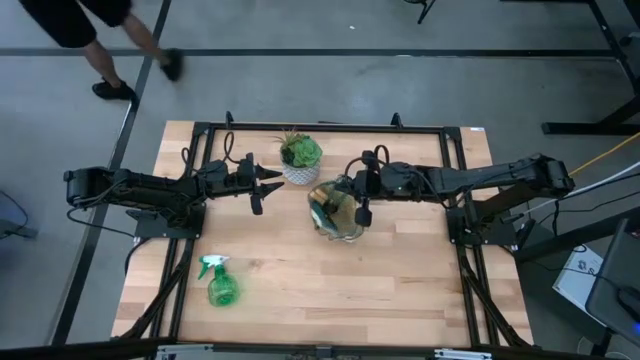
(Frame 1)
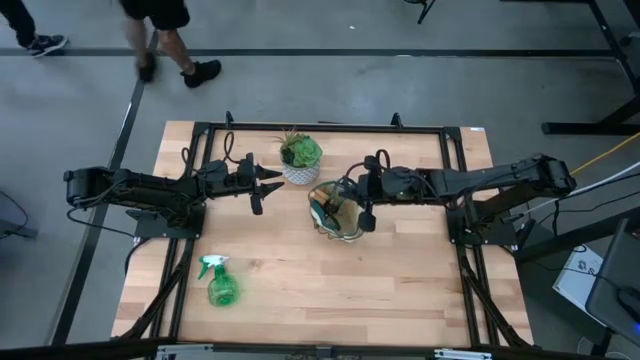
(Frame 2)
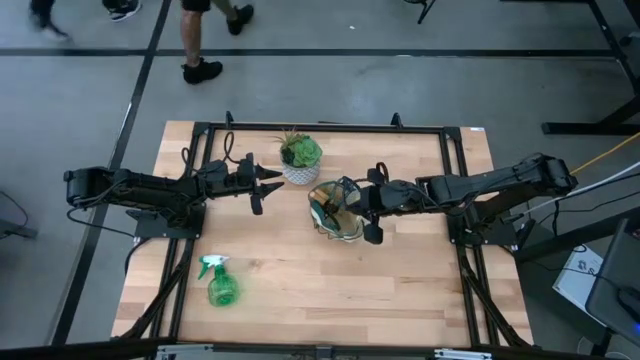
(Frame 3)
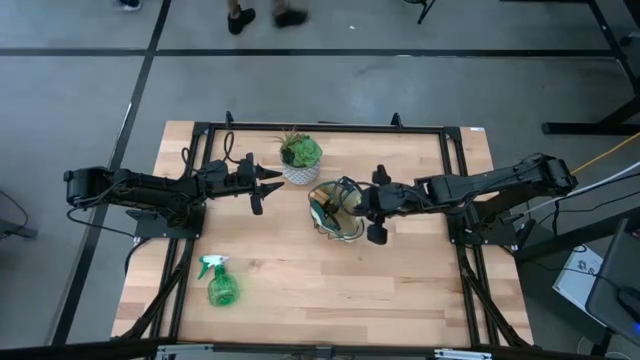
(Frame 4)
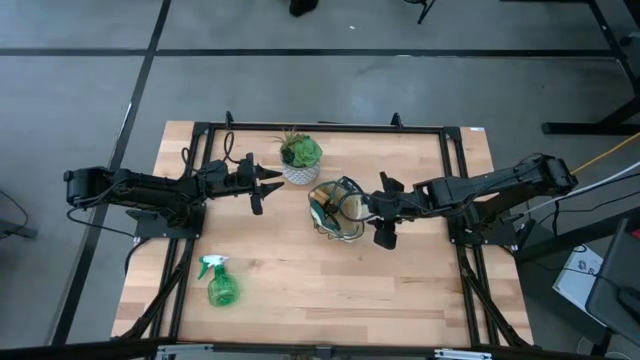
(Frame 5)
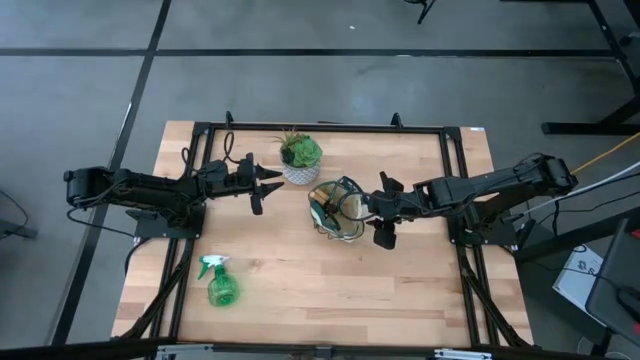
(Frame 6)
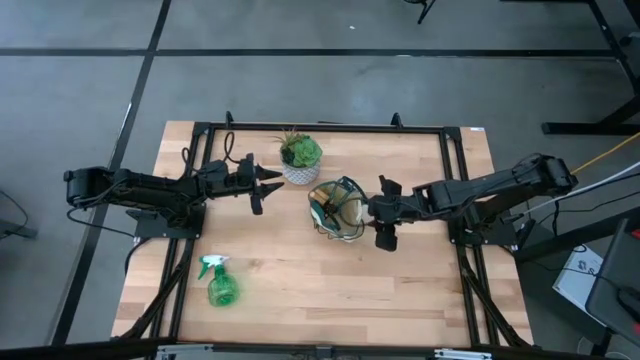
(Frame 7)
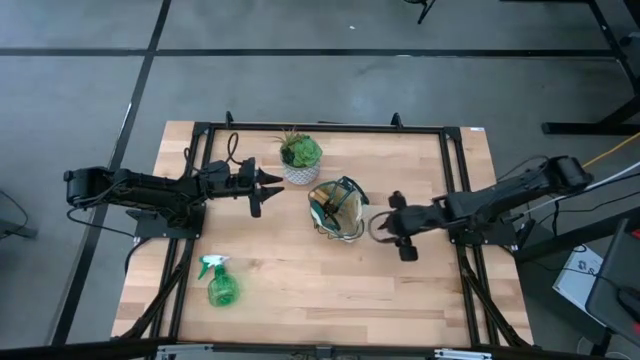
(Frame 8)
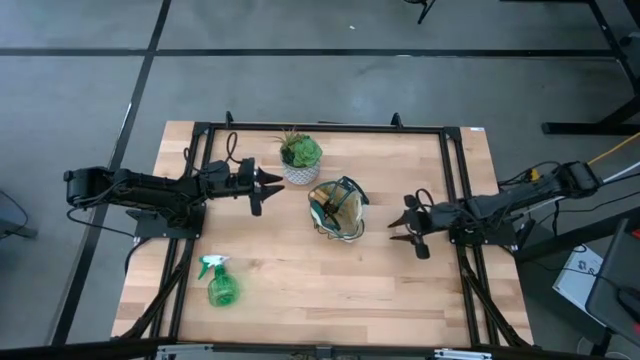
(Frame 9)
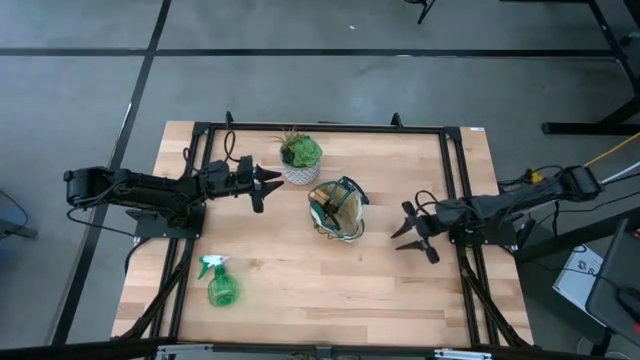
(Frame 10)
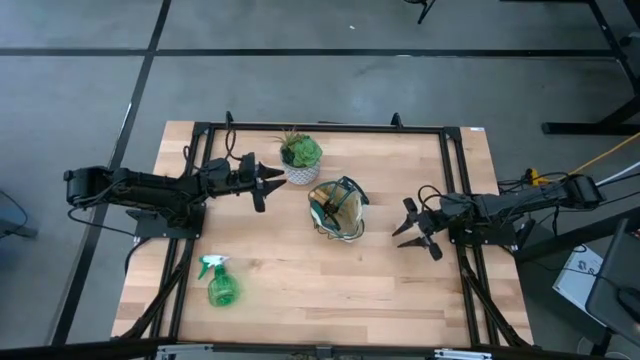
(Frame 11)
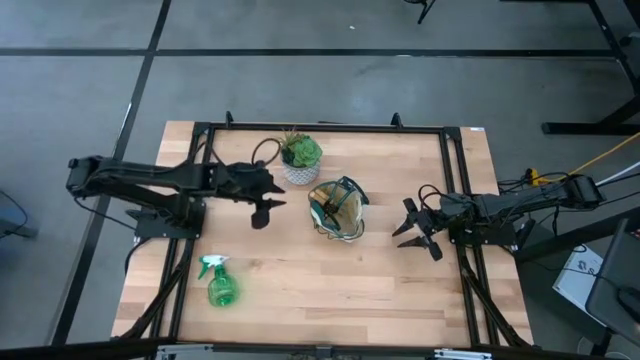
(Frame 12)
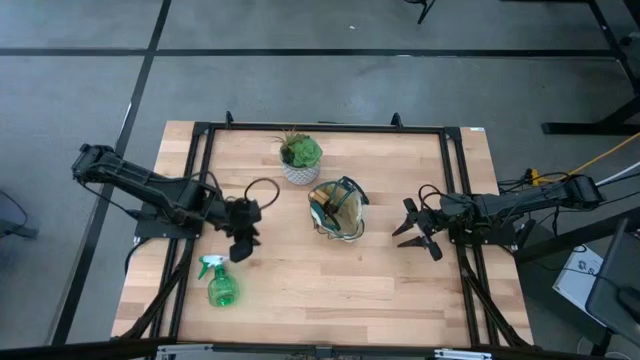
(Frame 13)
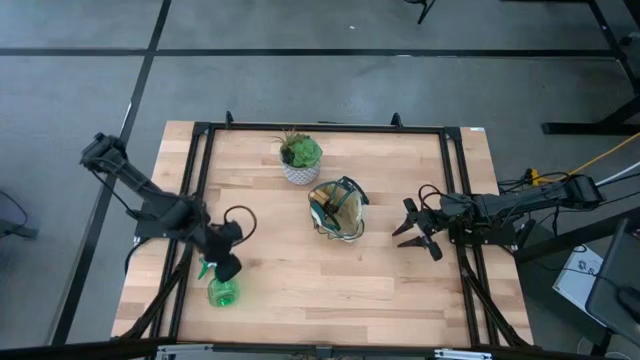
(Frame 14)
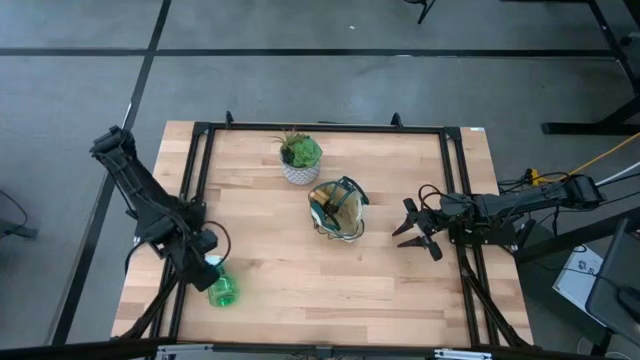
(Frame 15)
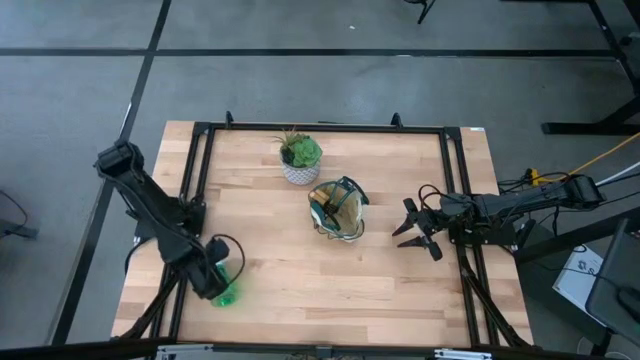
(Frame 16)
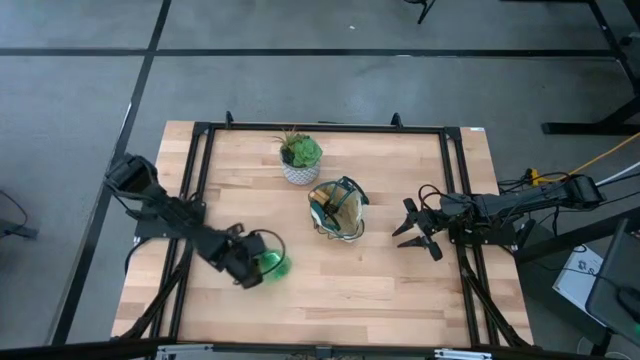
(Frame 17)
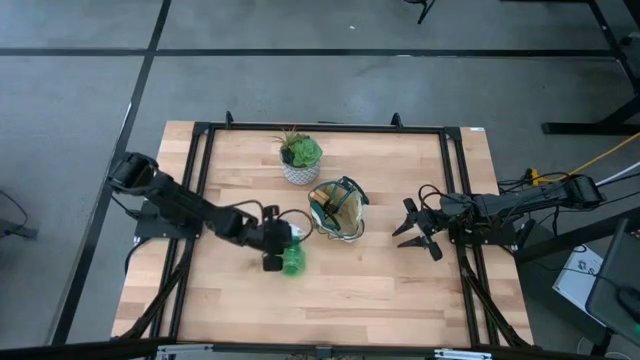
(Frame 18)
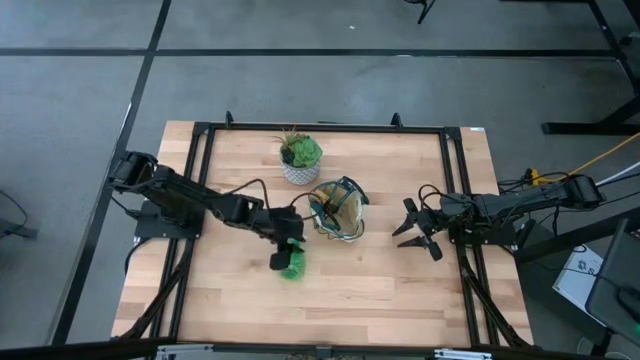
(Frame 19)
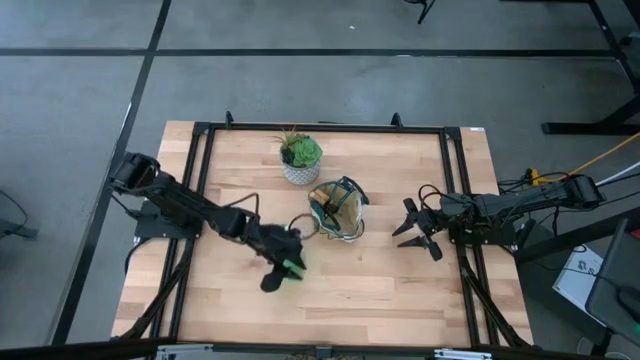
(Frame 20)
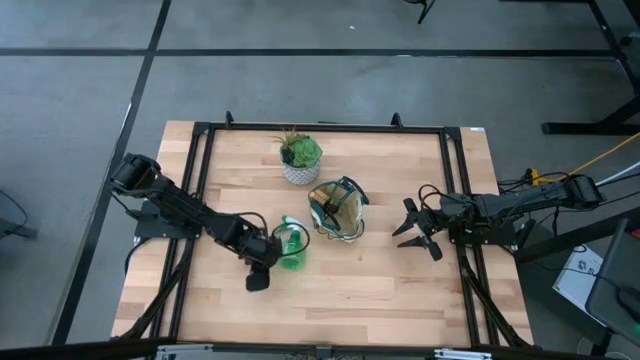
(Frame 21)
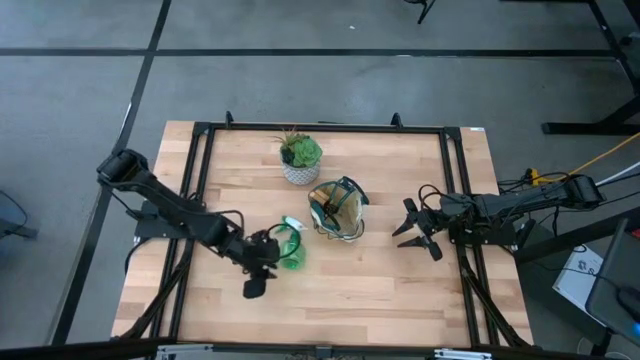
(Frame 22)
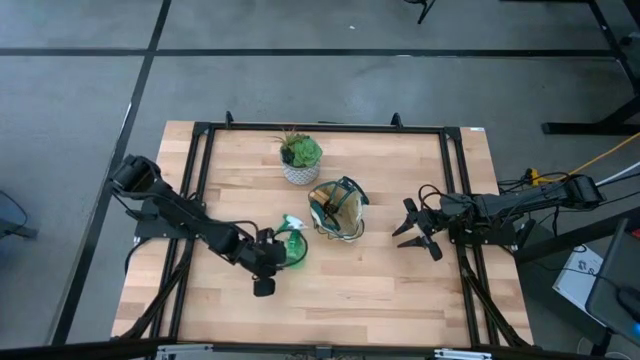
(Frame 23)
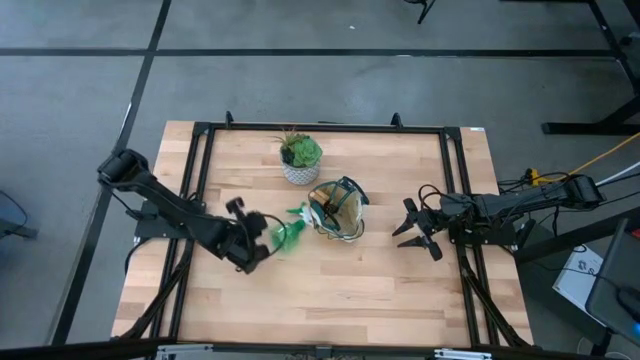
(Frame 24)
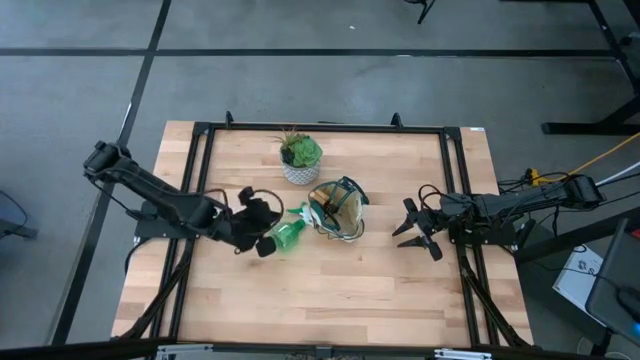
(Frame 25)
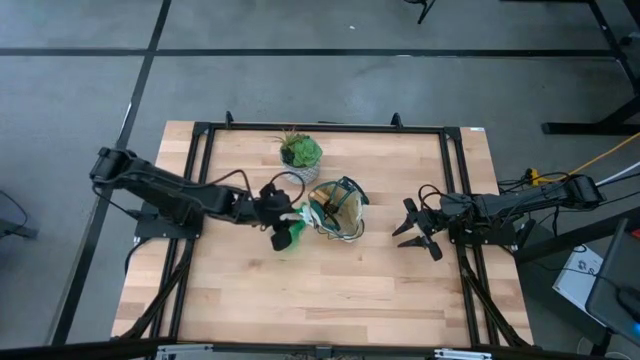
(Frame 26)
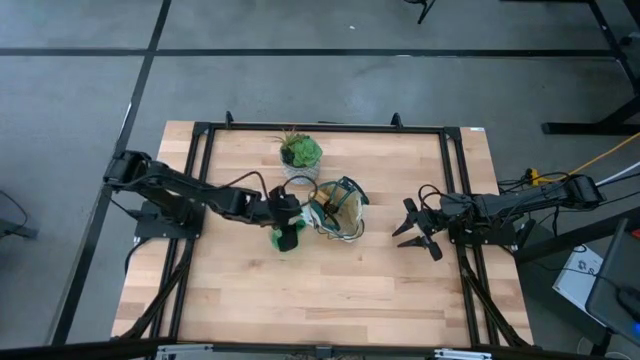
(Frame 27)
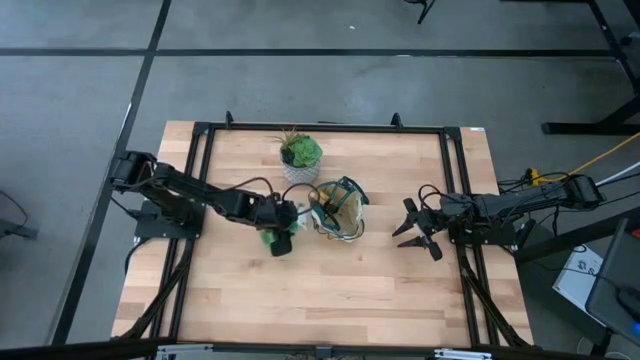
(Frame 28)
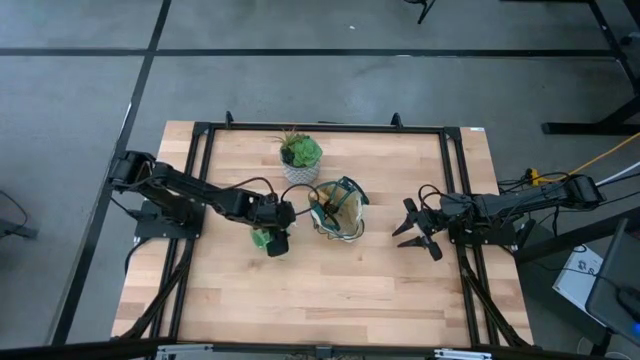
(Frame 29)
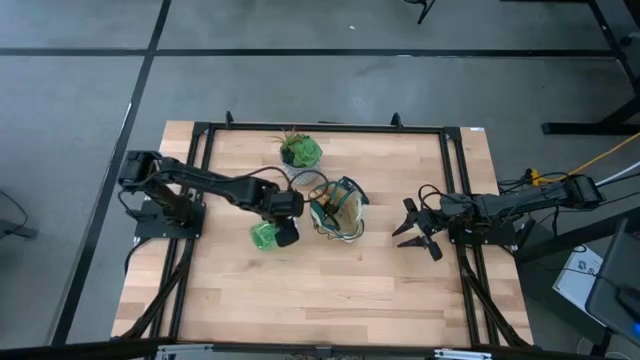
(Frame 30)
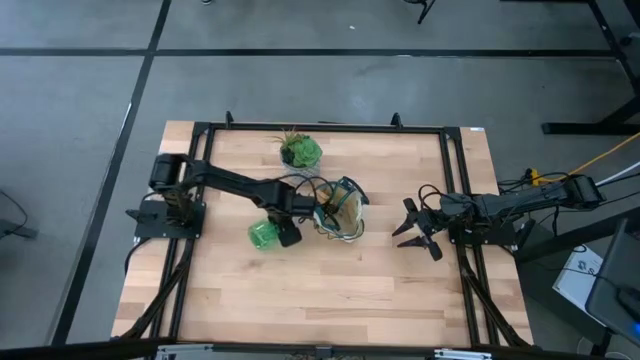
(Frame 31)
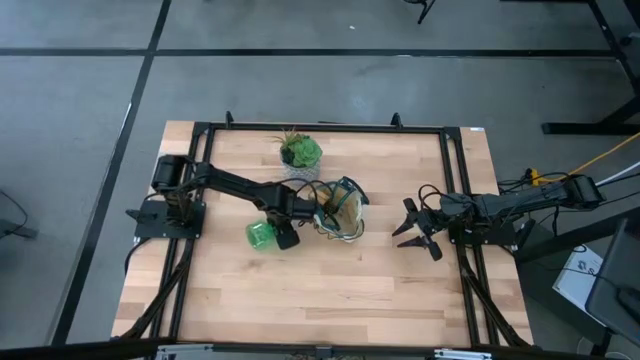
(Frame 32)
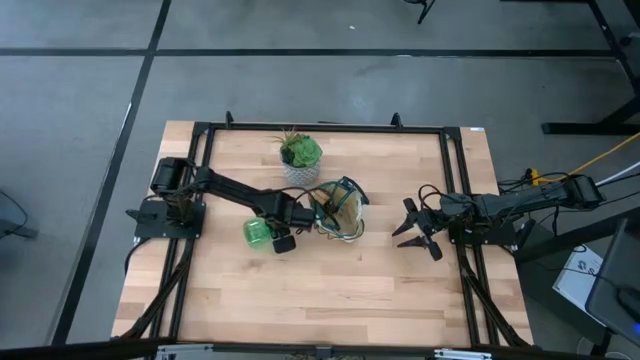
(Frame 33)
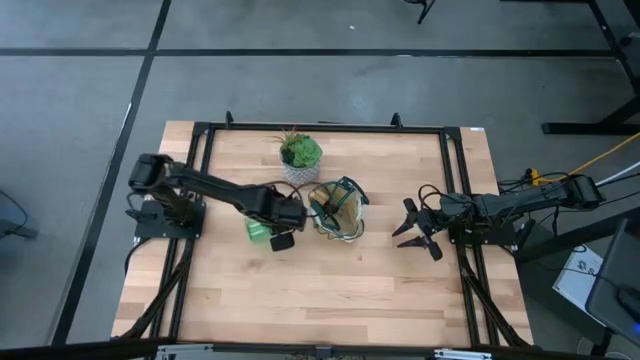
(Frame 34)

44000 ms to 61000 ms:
Task: Pick & Place Garden tools in Gardening bag
Put the spray bottle into the gardening bag

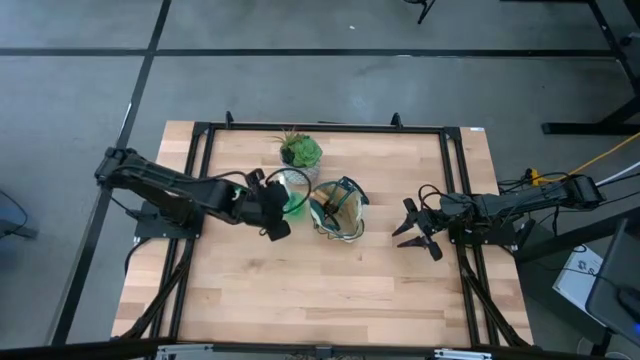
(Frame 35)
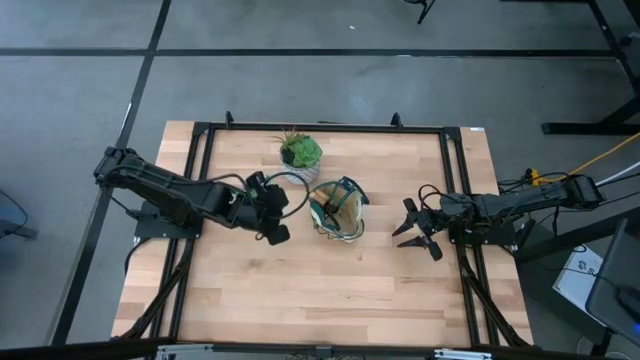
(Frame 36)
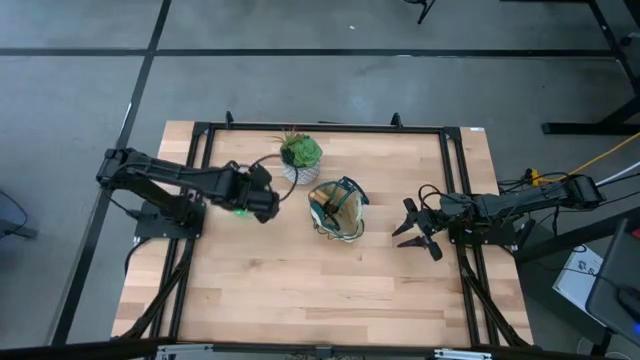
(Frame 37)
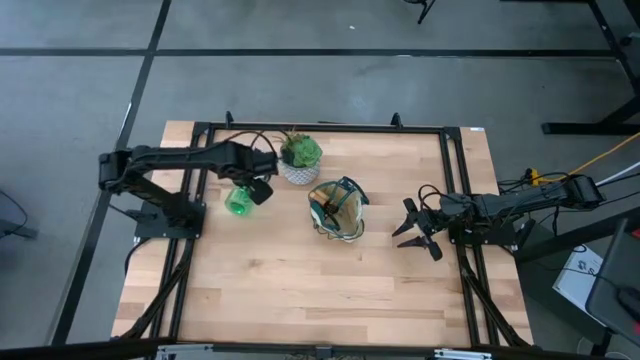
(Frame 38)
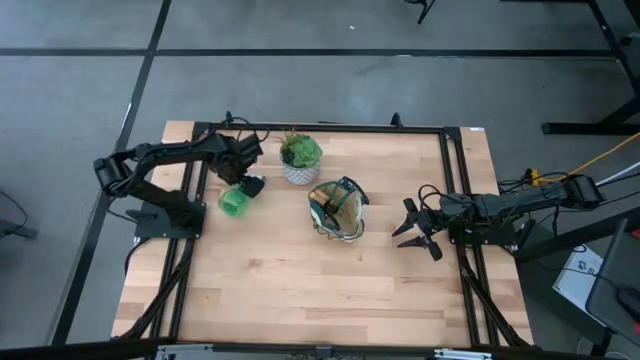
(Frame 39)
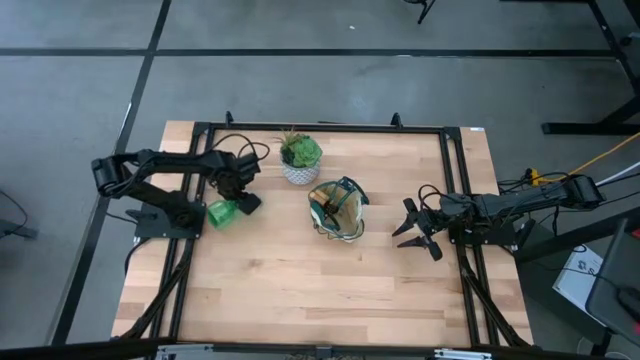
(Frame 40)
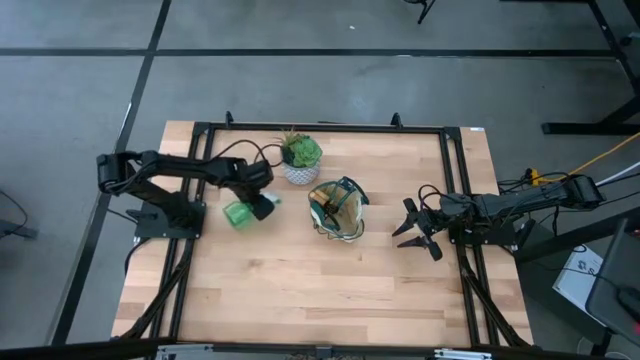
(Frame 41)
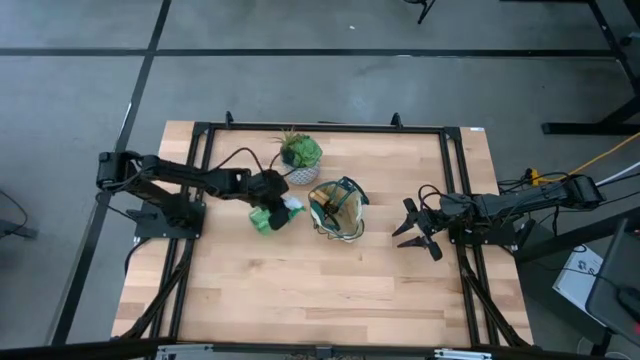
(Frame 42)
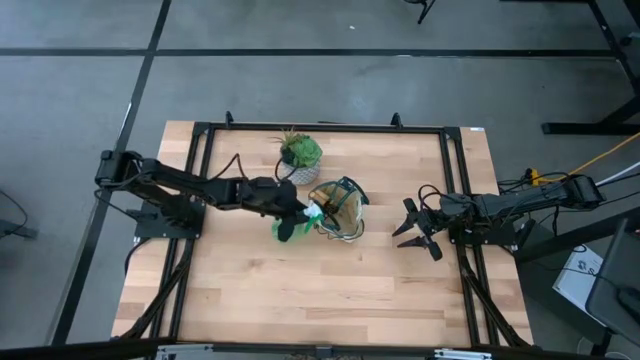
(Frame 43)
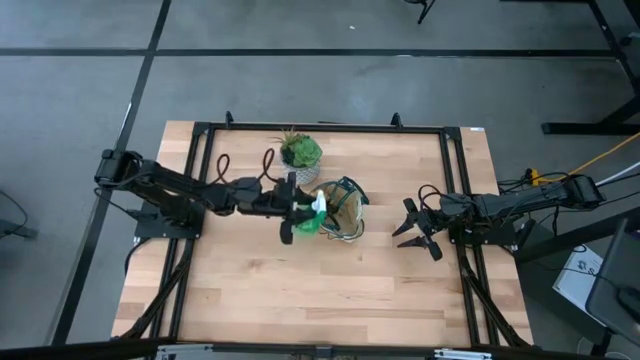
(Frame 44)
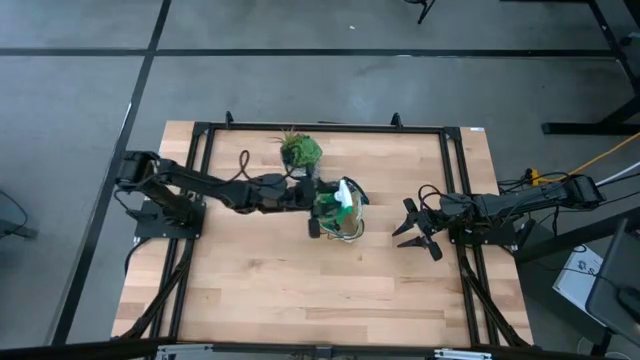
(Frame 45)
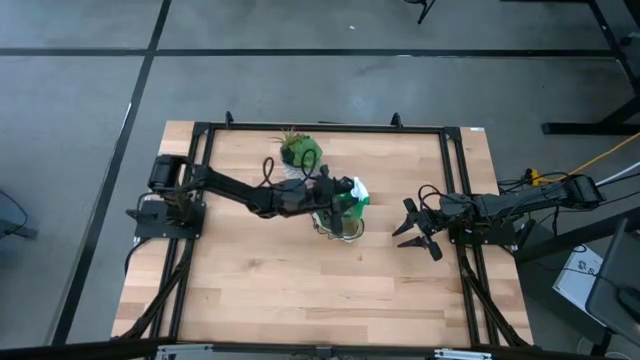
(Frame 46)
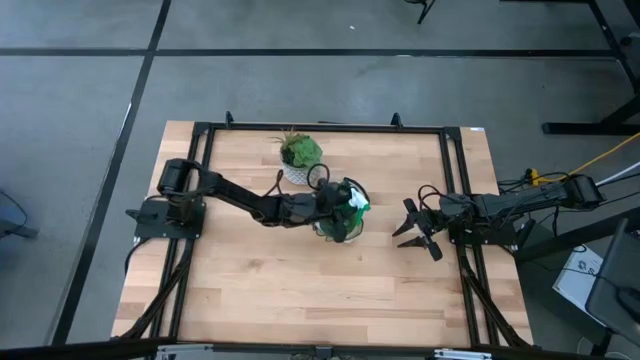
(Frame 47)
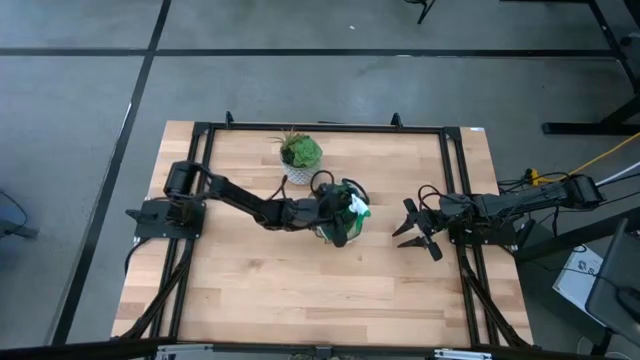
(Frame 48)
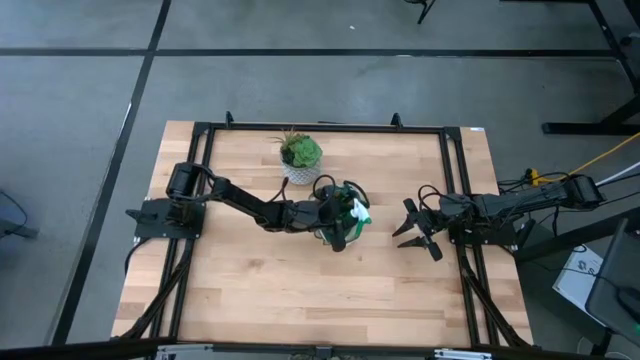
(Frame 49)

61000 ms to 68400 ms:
Put the spray bottle into the gardening bag
